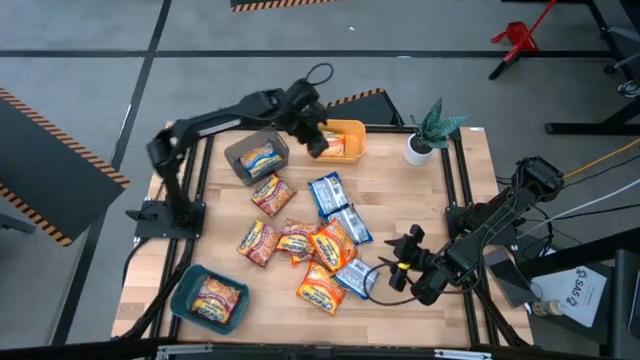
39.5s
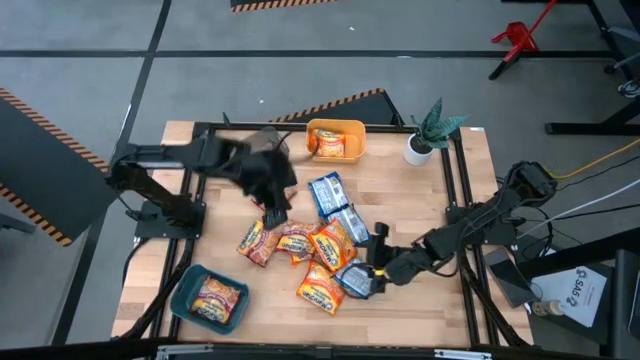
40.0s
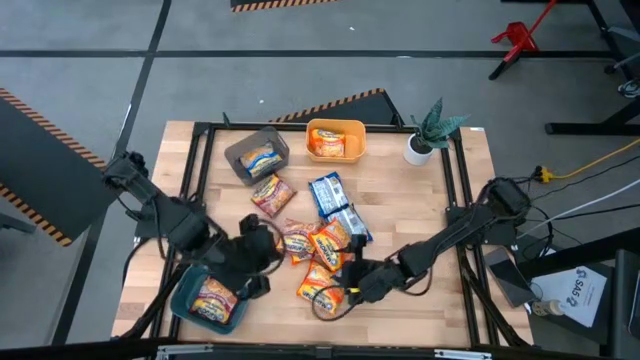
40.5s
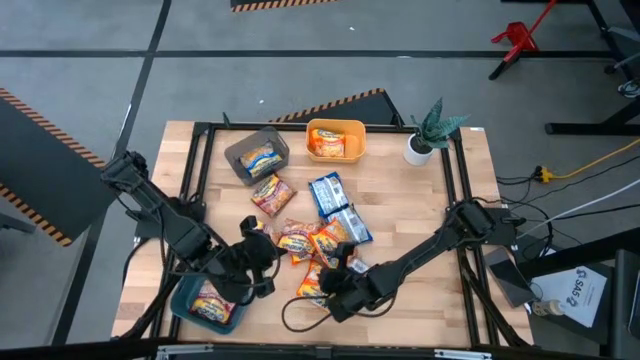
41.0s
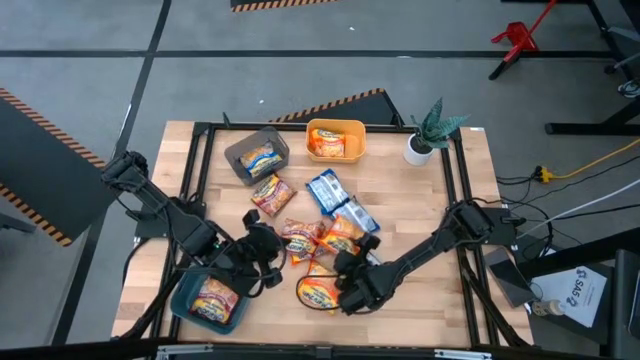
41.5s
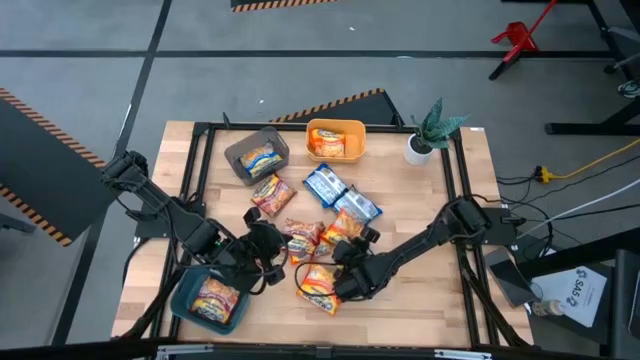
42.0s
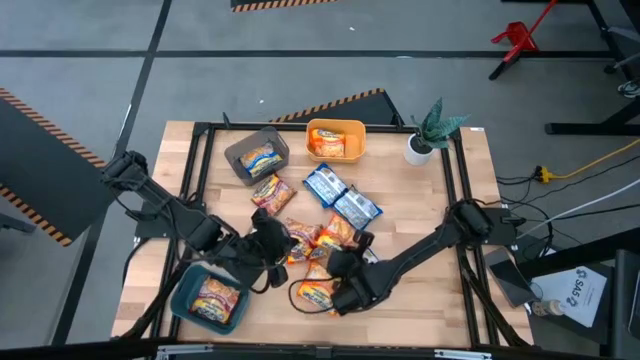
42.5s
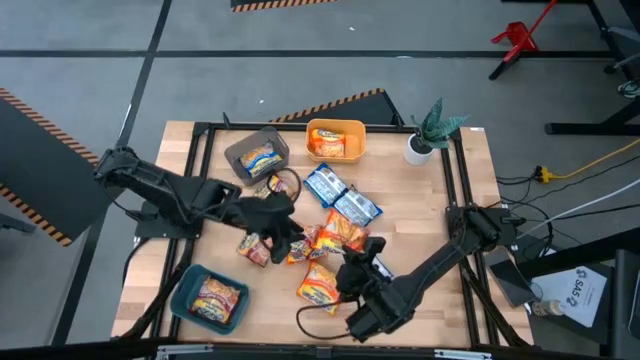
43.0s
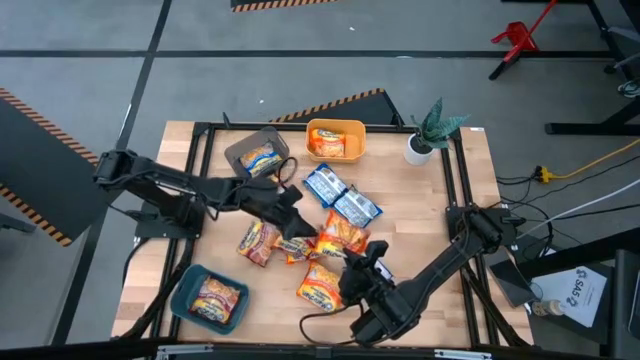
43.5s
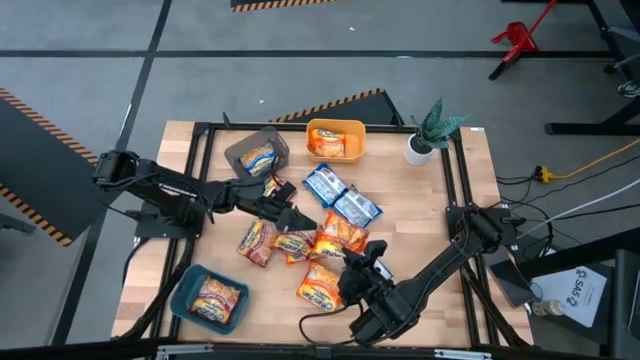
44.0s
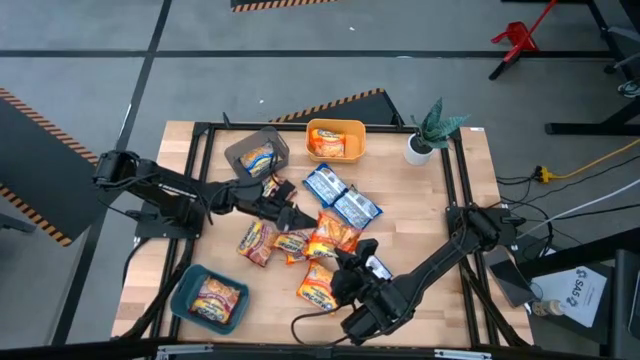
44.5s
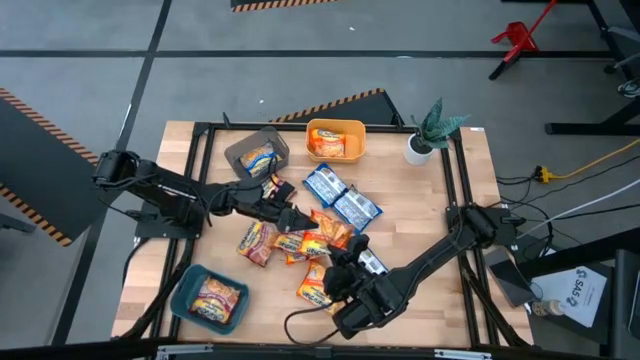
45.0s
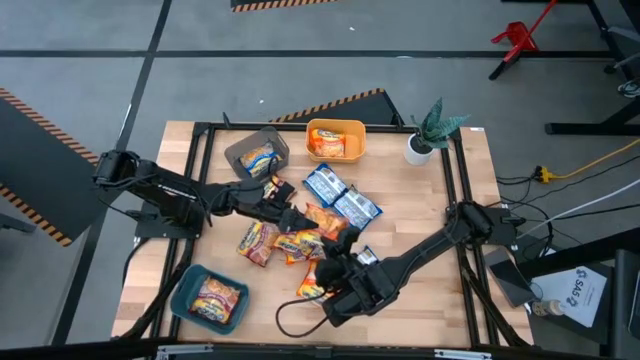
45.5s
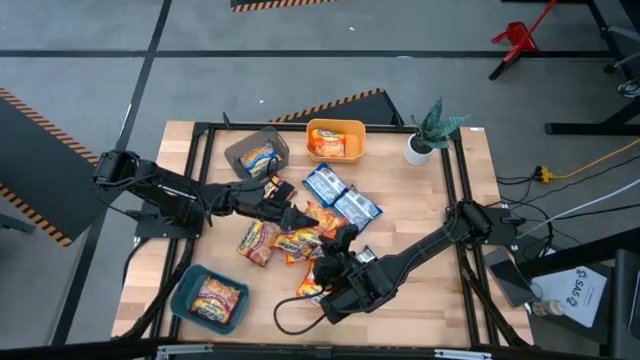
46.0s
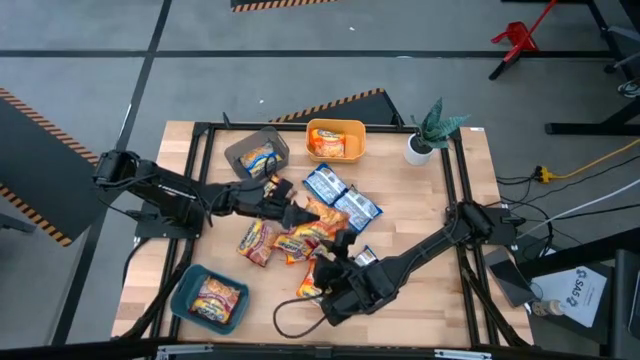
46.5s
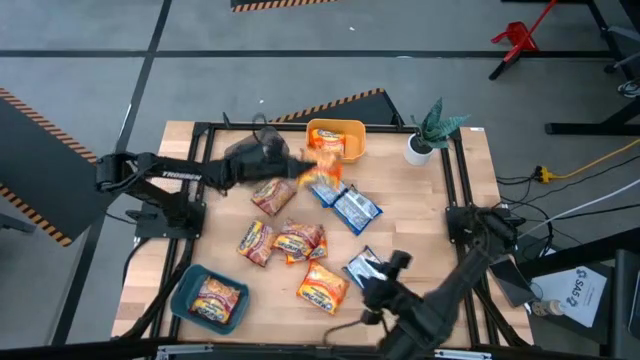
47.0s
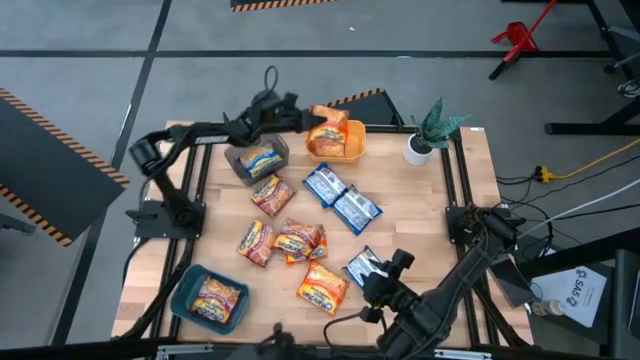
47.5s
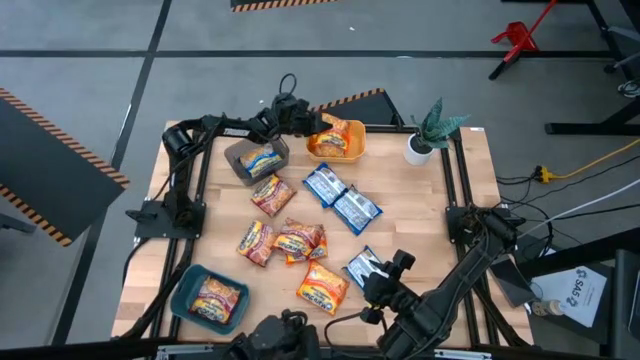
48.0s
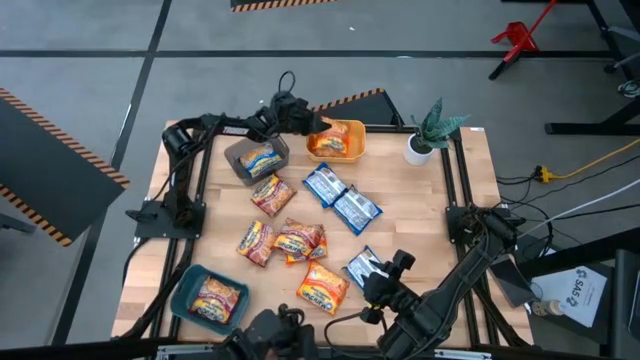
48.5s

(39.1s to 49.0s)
Task: Sort Maruchan noodles
Put the pack of orange ramen noodle soup into the yellow bin

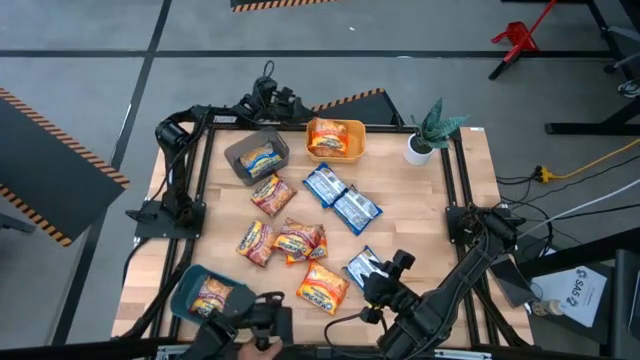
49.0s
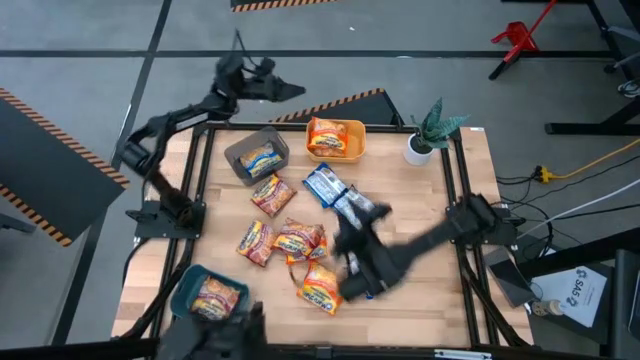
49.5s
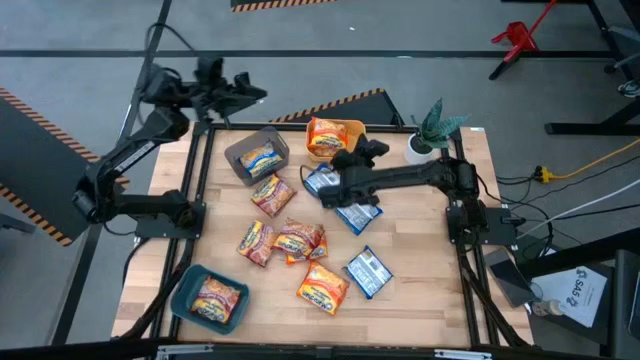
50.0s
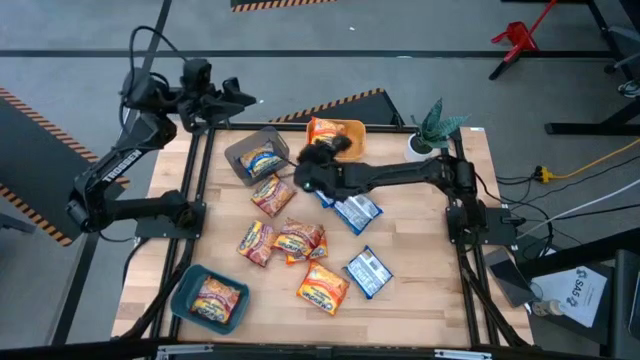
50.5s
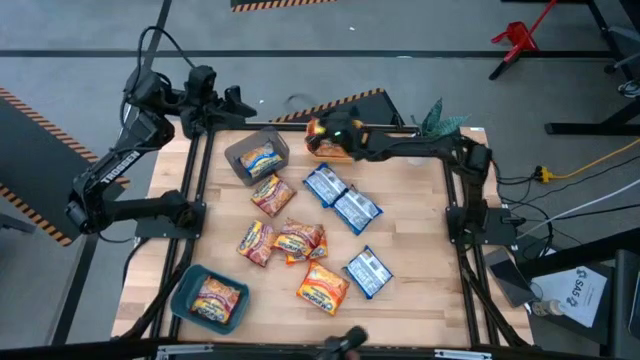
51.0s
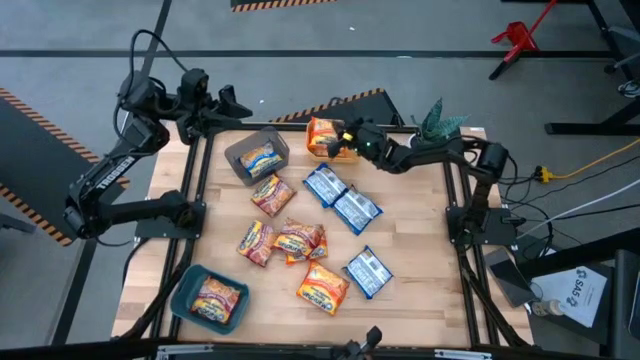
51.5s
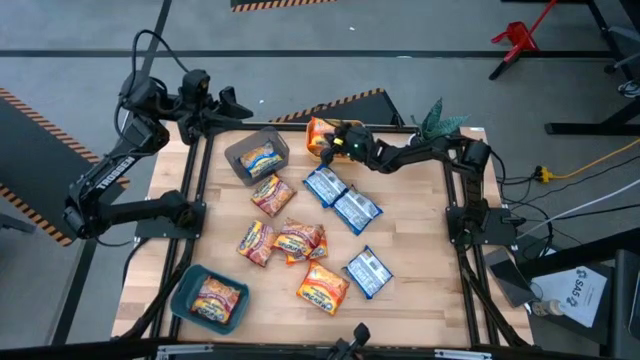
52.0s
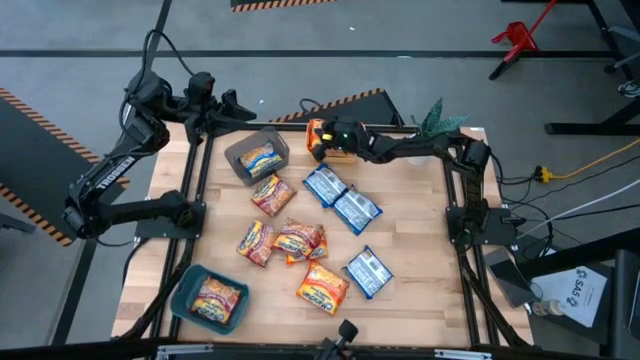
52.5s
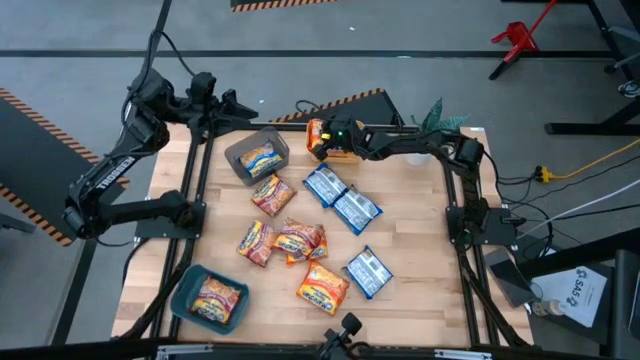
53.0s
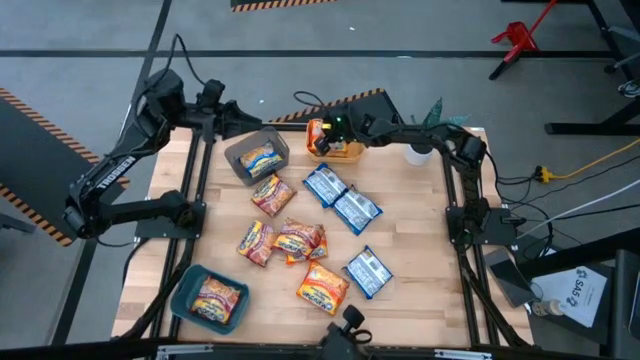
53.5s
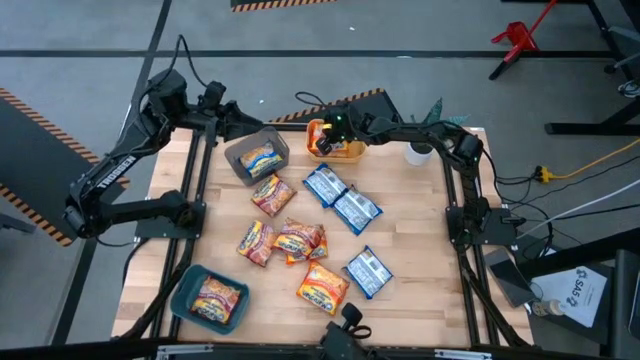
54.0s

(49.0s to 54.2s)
Adjust the pack of orange ramen noodle soup

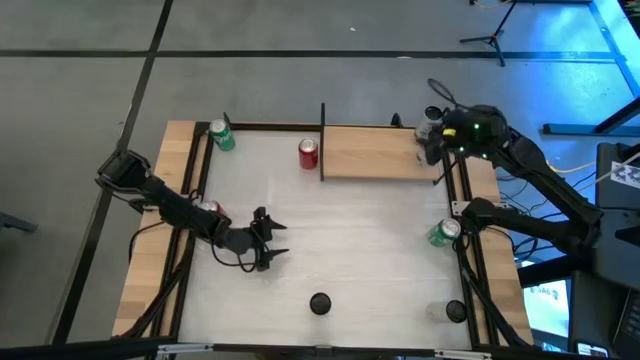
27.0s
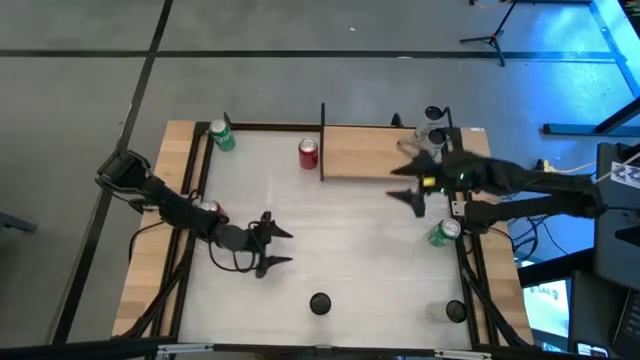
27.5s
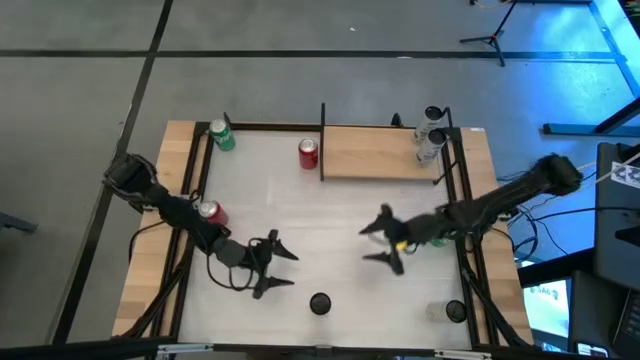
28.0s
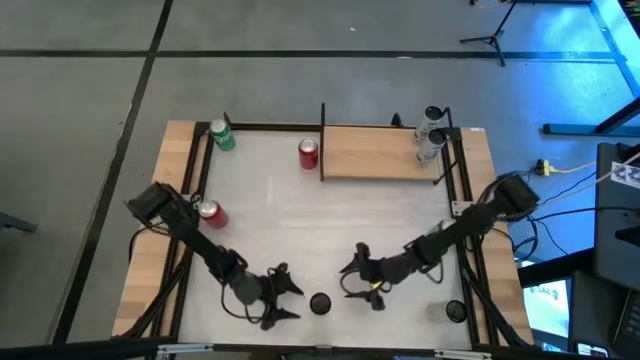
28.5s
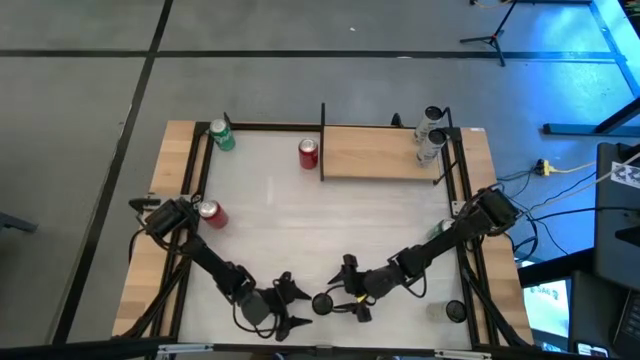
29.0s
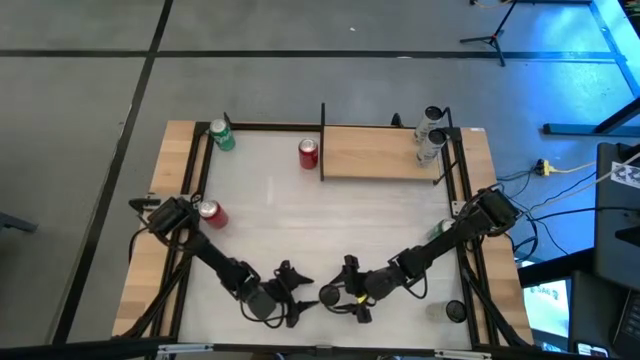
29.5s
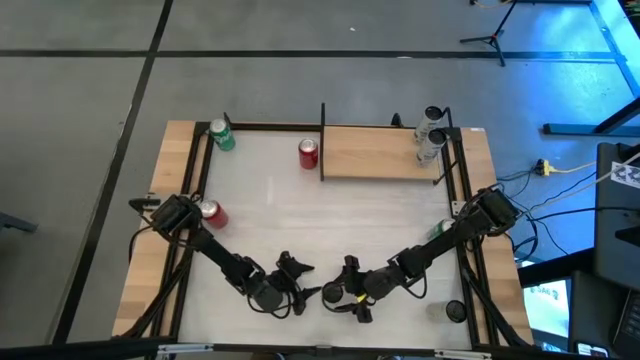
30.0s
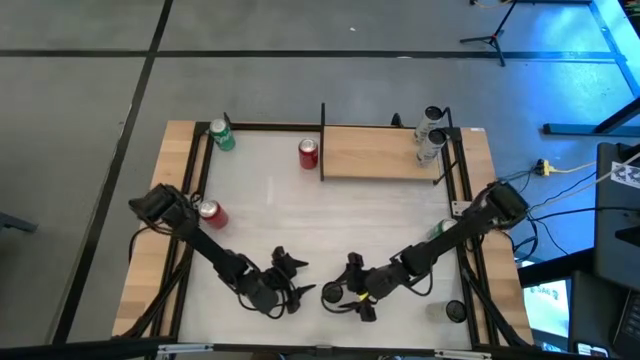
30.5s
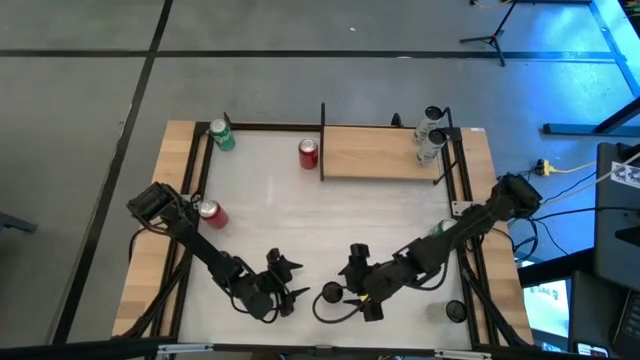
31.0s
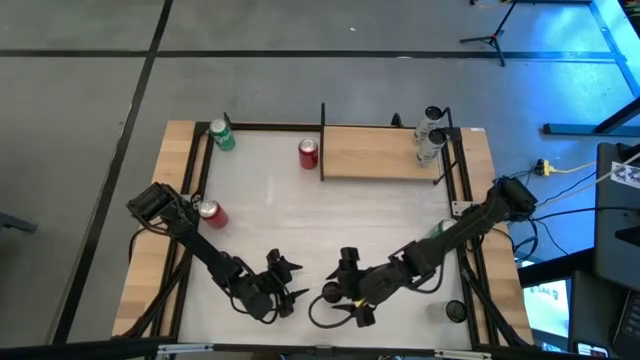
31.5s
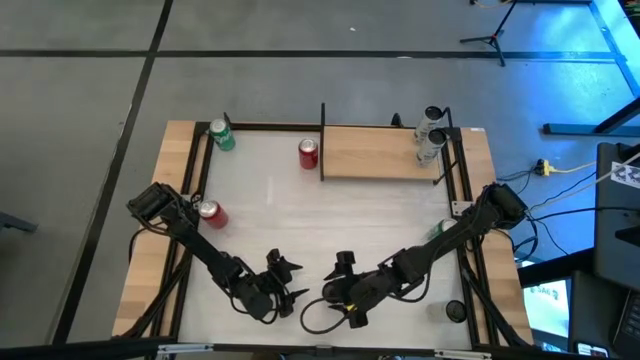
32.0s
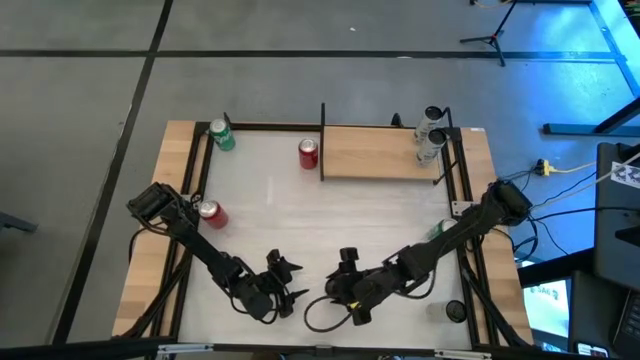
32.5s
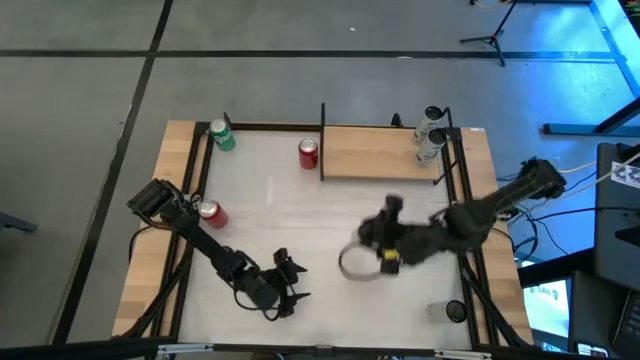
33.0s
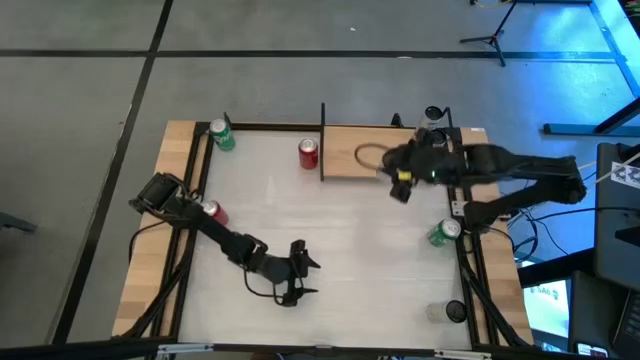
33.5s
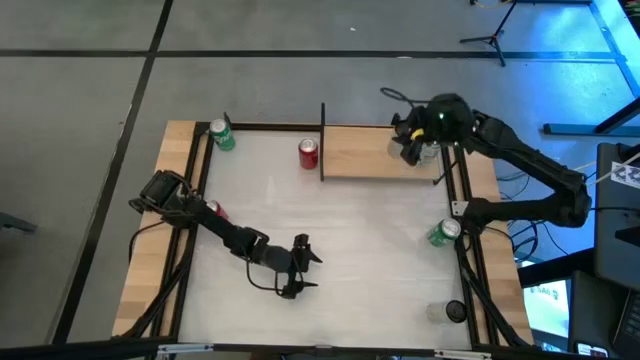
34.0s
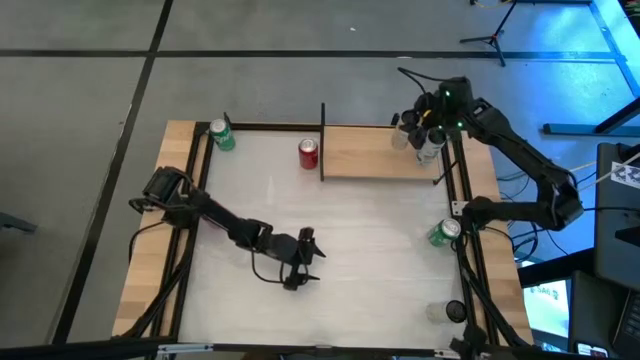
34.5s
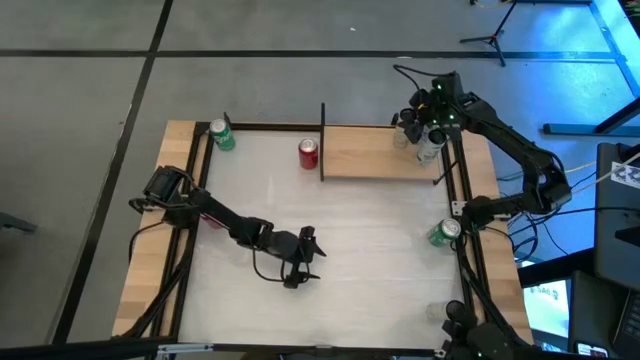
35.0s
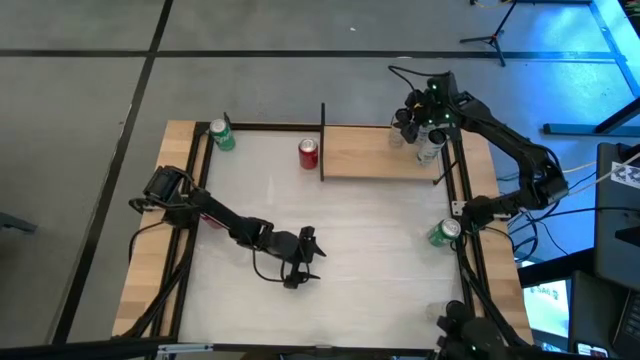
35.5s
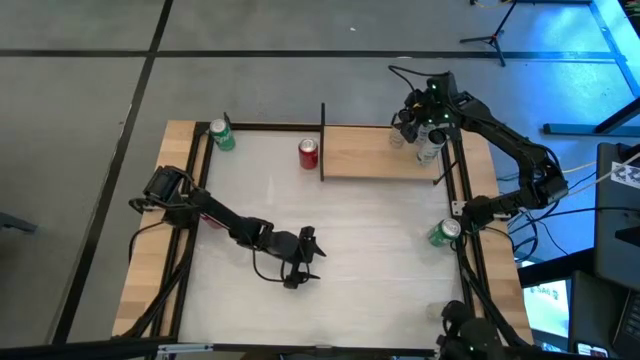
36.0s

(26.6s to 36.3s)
Task: Place canned beverage on shelf
Put the left white yellow soda can on the shelf
